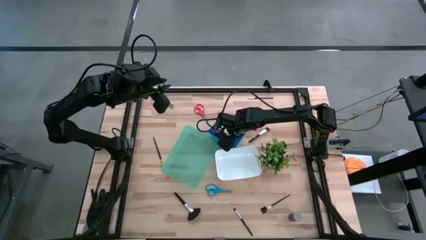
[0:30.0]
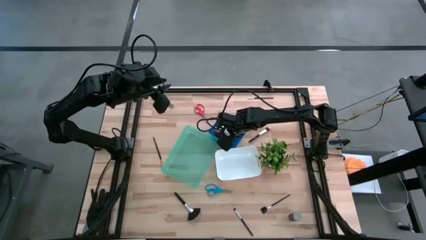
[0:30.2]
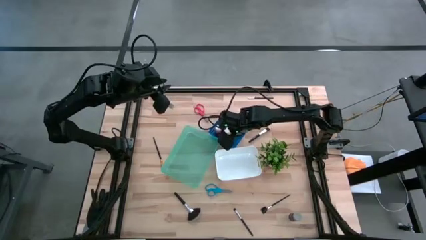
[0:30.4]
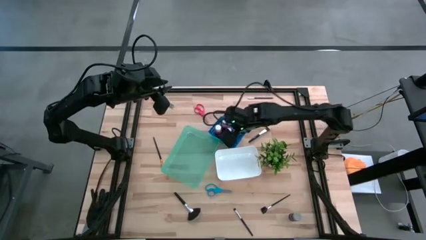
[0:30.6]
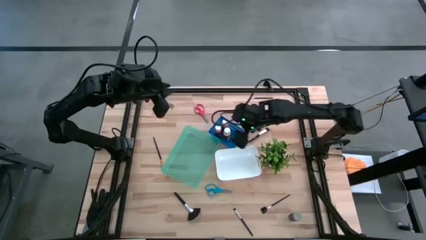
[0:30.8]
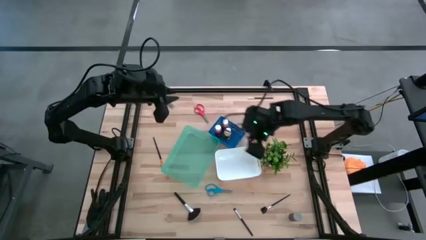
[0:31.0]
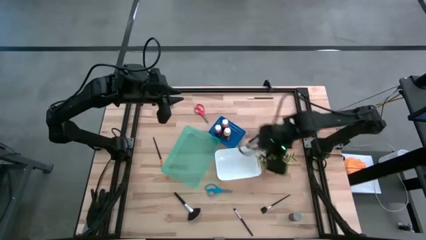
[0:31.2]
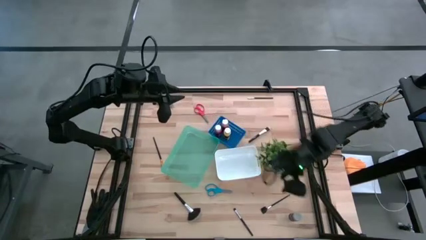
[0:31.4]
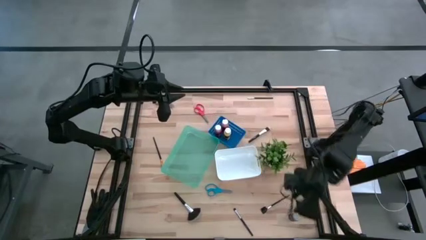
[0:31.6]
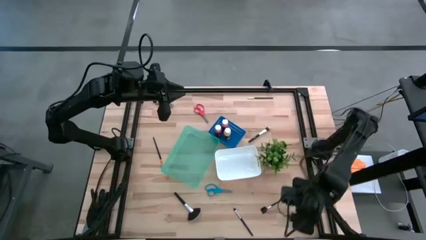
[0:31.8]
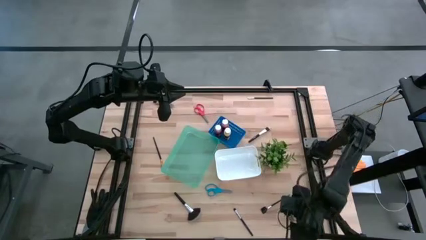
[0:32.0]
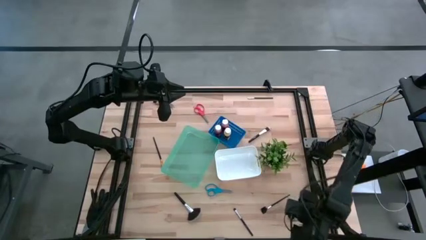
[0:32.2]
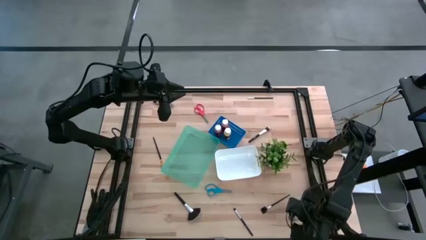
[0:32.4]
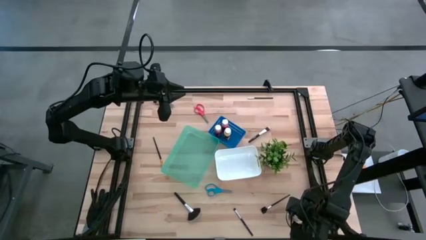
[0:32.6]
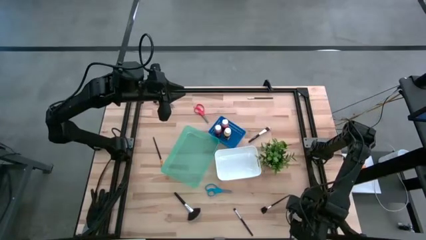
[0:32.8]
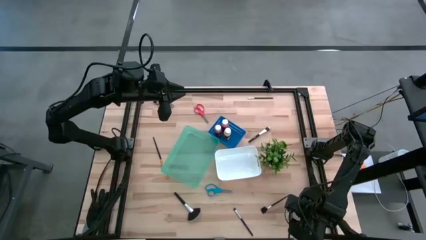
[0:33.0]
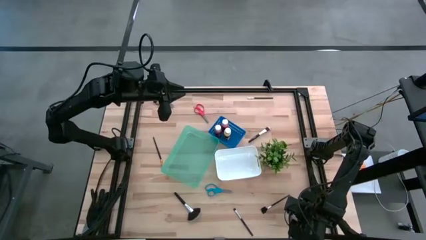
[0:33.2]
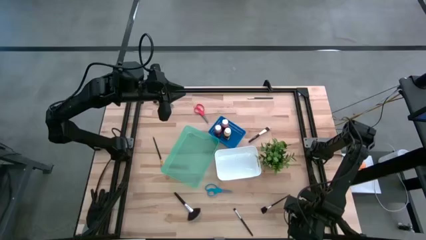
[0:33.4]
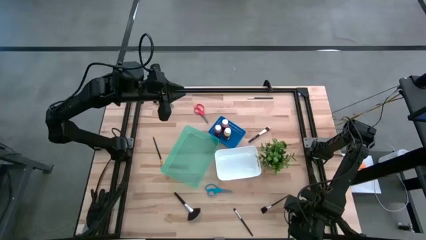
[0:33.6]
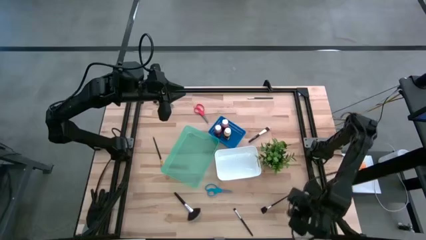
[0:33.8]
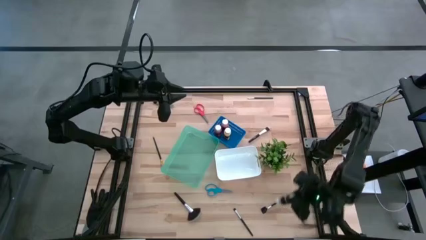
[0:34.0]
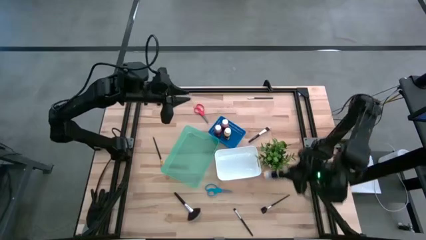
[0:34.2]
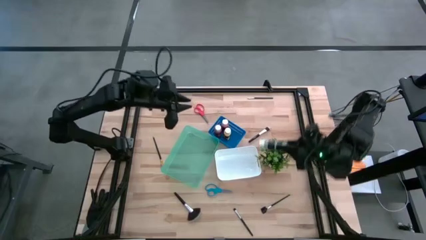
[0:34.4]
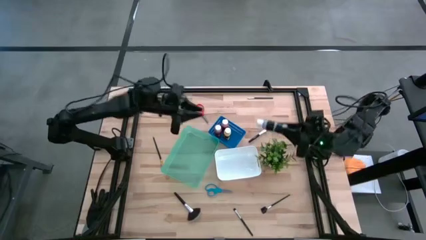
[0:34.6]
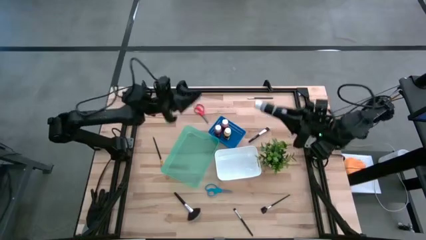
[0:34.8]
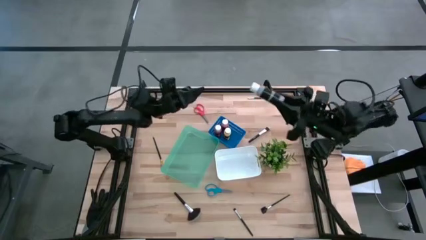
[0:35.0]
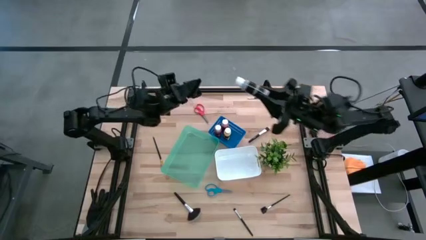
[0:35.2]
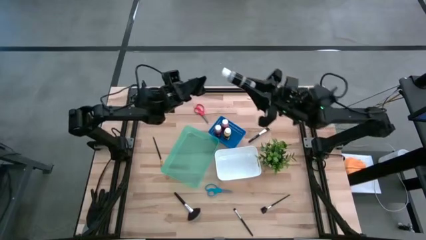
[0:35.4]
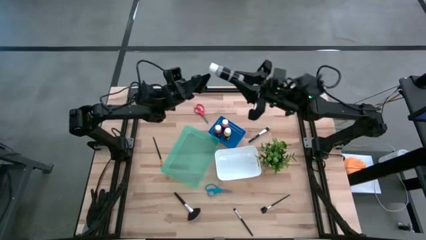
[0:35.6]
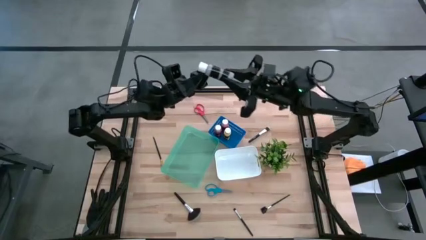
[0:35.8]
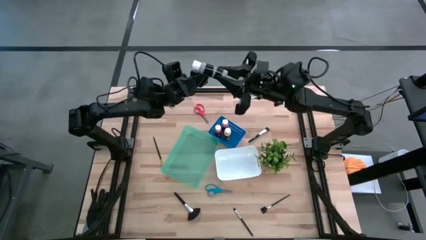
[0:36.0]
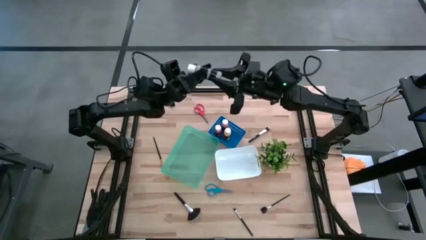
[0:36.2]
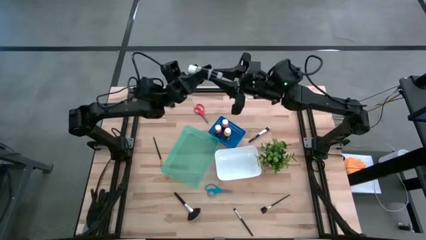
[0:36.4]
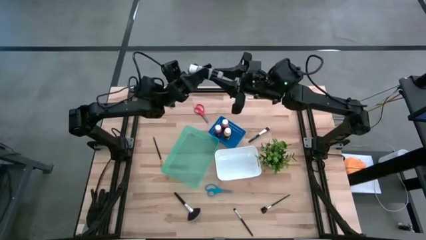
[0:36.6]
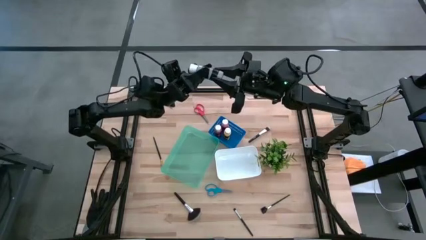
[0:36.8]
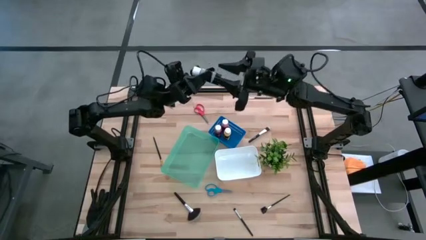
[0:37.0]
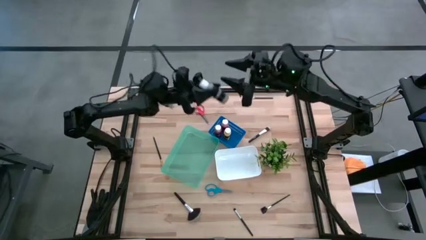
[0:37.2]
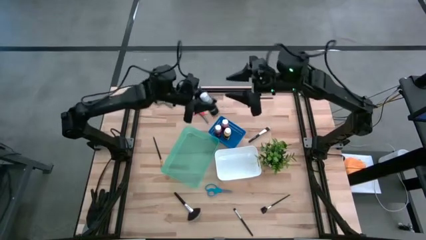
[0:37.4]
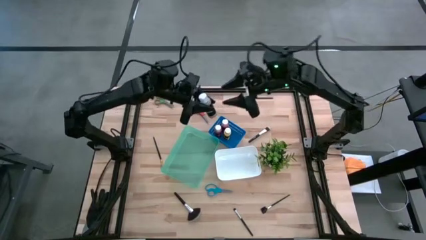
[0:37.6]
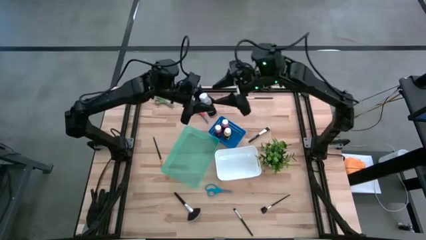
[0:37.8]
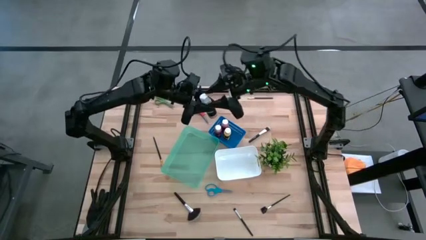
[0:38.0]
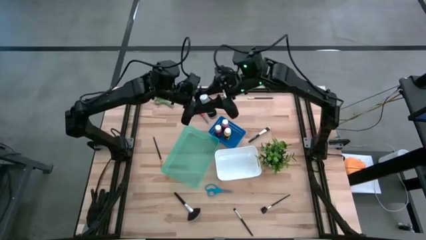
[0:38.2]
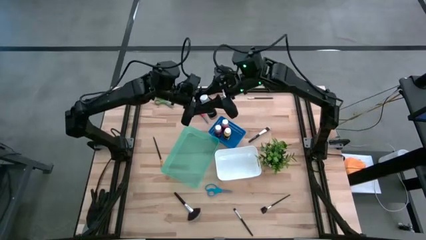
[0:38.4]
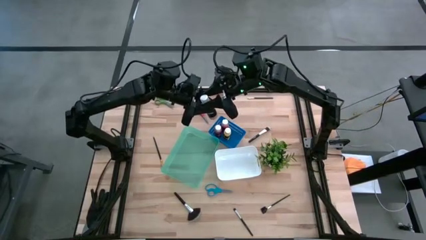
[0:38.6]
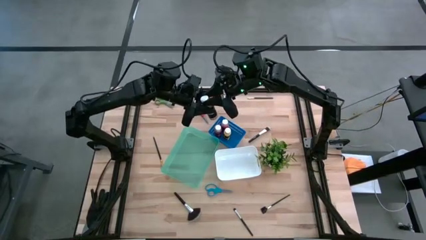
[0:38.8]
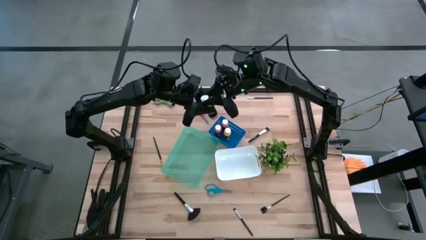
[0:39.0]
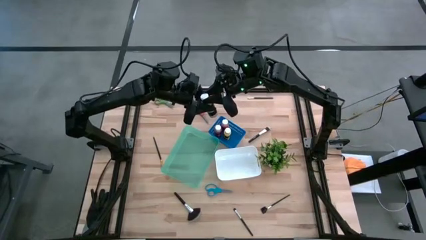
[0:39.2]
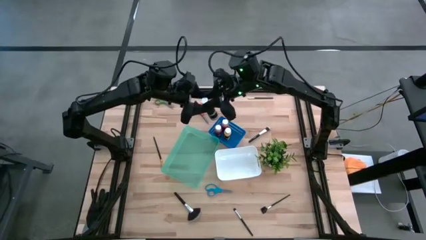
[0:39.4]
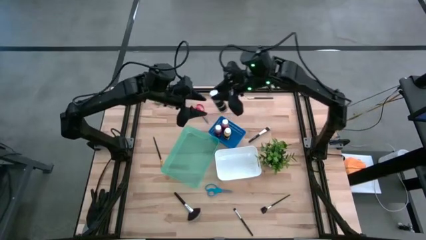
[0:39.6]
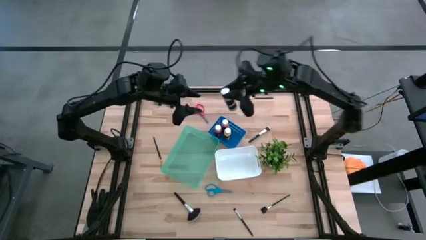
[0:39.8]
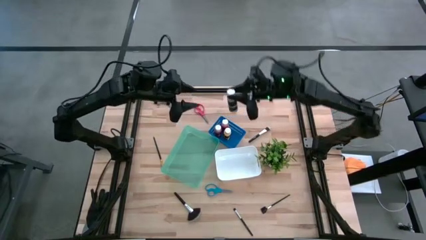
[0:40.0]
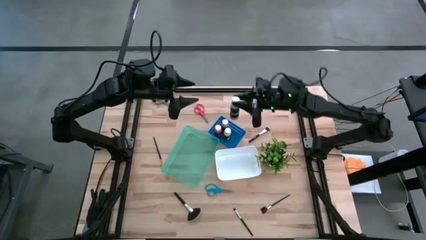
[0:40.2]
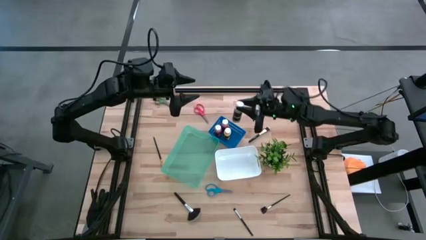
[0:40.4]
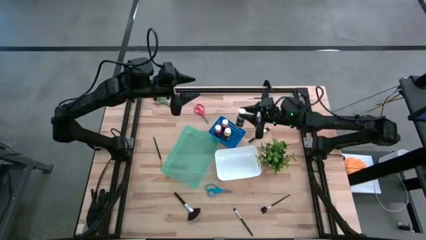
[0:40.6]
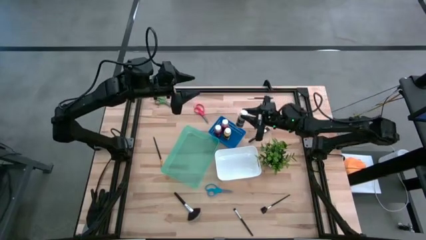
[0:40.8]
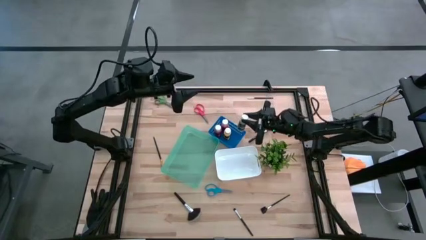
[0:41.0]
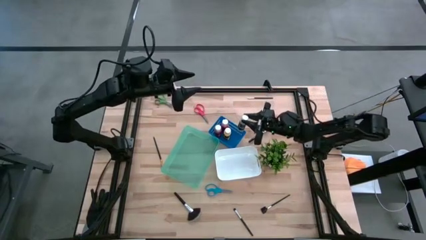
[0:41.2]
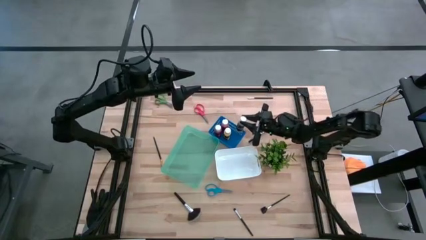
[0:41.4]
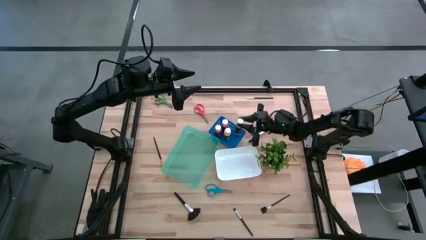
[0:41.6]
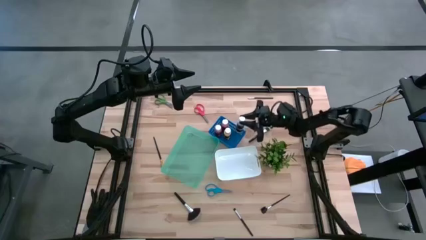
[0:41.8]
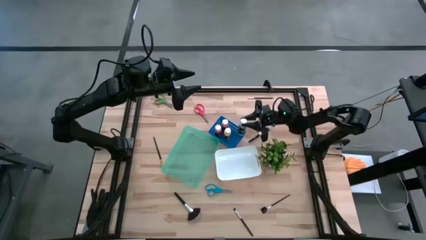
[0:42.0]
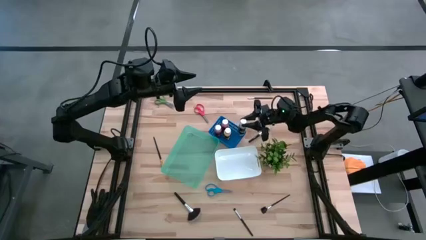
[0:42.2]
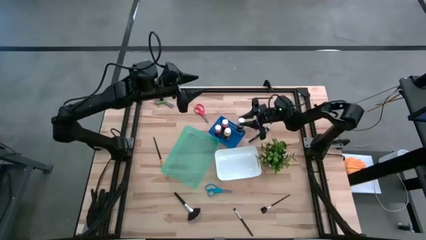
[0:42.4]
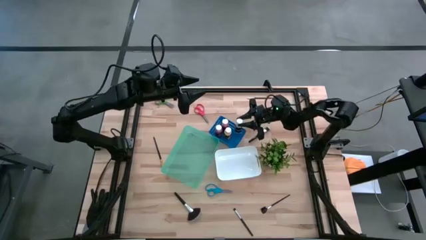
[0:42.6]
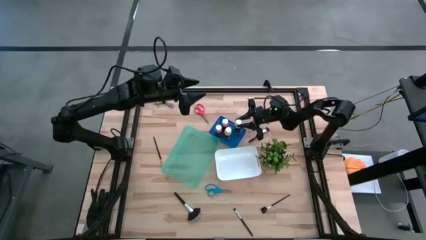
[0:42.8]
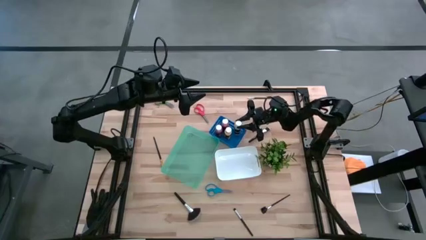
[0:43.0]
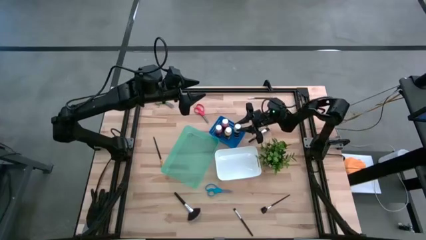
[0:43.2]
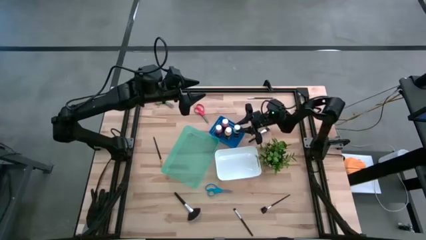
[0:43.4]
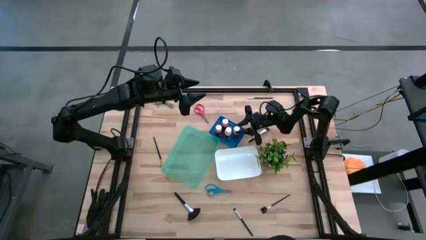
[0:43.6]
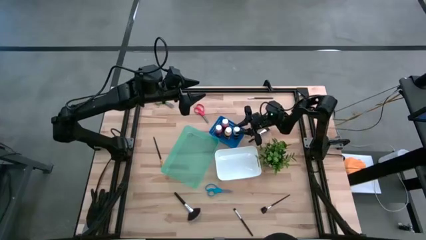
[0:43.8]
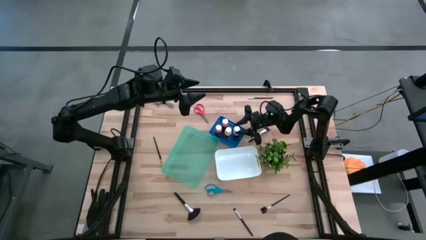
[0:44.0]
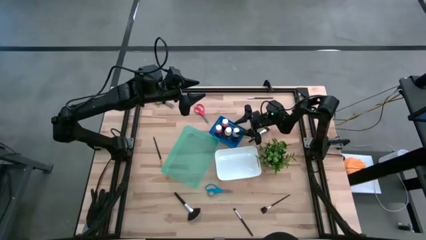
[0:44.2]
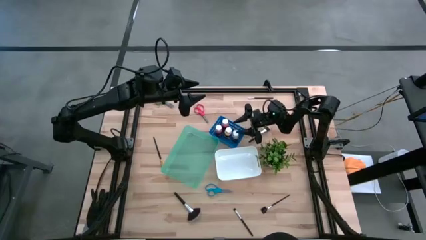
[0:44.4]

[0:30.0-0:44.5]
Task: Pick & Place Paint Supplies
Put the gray paint bottle into the blue bin
